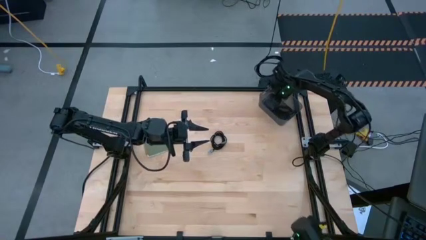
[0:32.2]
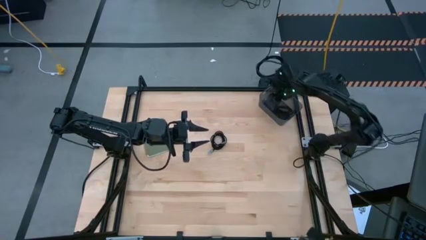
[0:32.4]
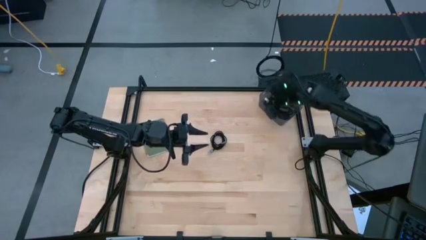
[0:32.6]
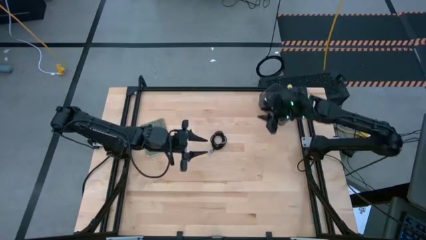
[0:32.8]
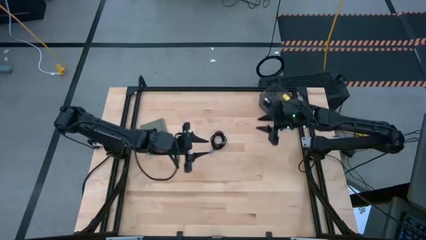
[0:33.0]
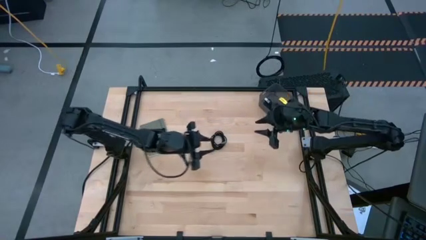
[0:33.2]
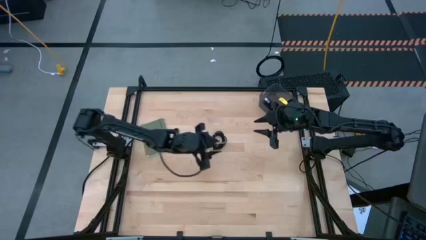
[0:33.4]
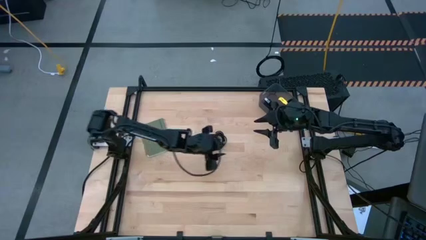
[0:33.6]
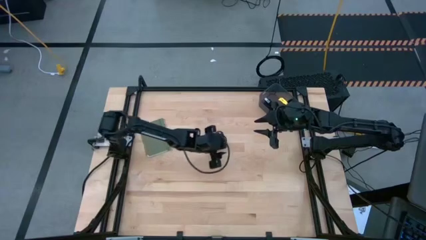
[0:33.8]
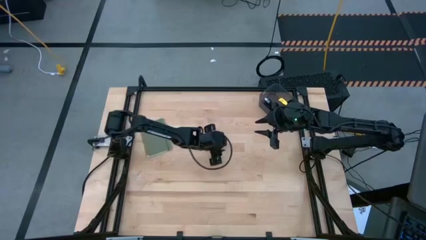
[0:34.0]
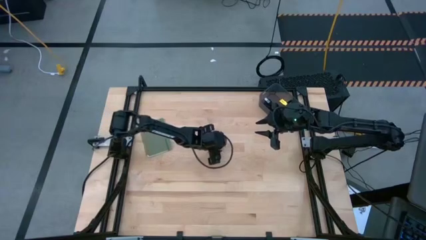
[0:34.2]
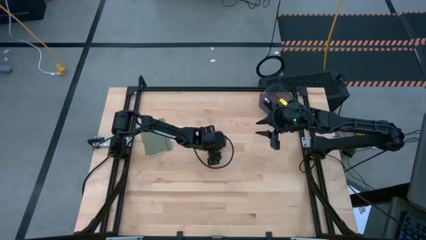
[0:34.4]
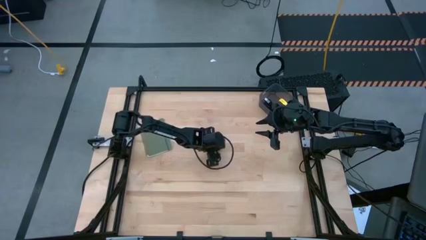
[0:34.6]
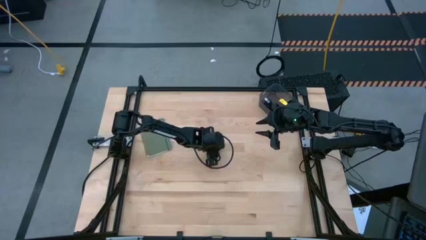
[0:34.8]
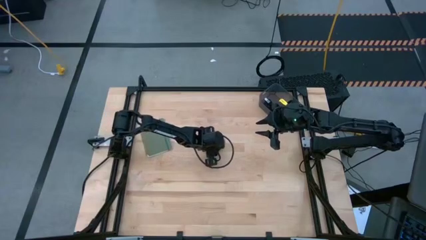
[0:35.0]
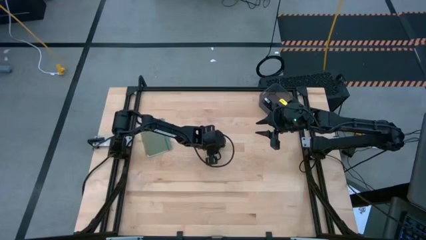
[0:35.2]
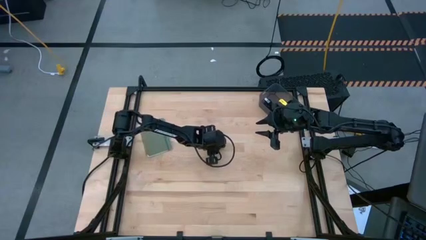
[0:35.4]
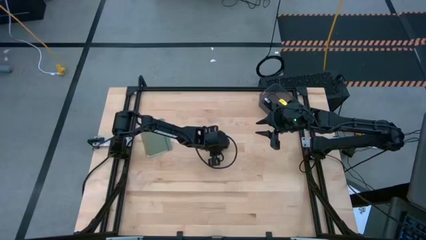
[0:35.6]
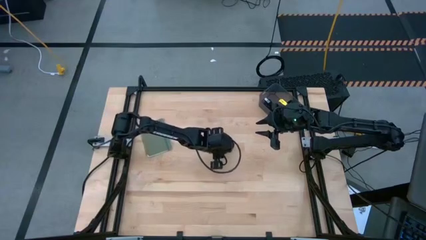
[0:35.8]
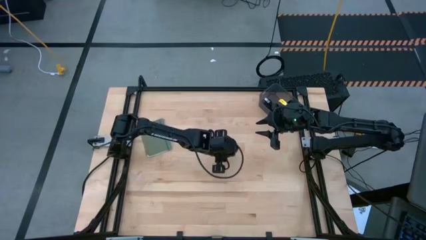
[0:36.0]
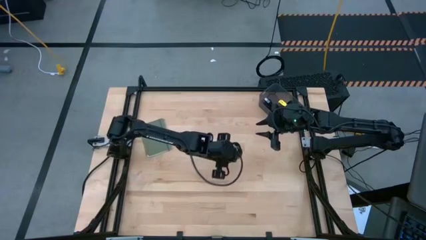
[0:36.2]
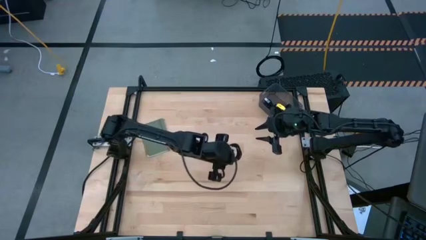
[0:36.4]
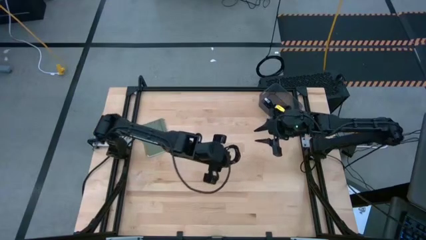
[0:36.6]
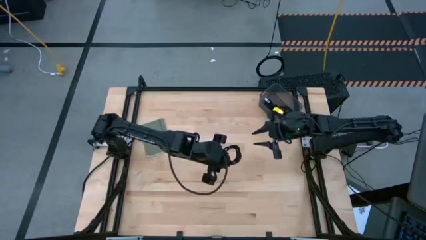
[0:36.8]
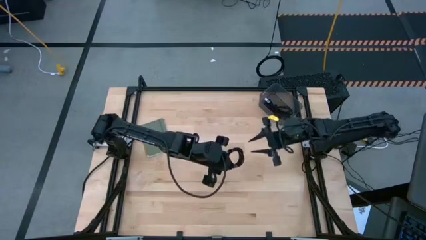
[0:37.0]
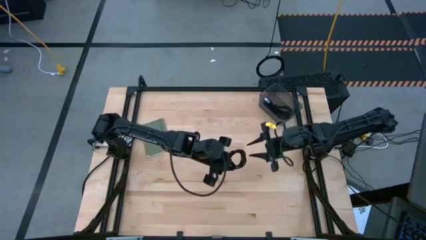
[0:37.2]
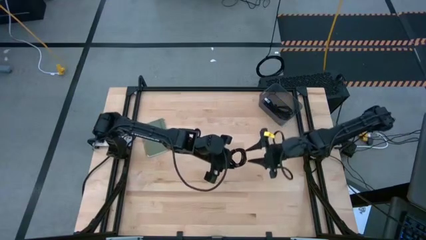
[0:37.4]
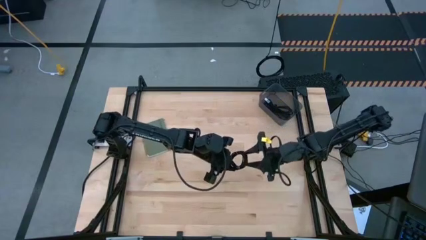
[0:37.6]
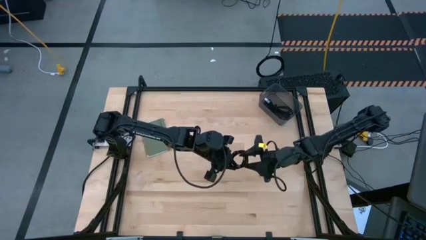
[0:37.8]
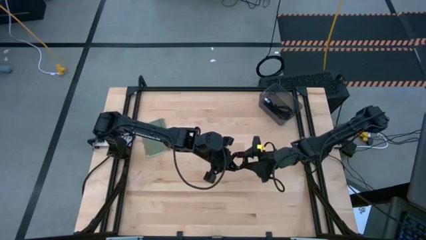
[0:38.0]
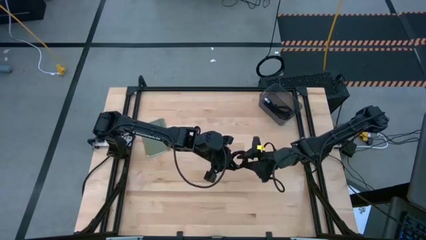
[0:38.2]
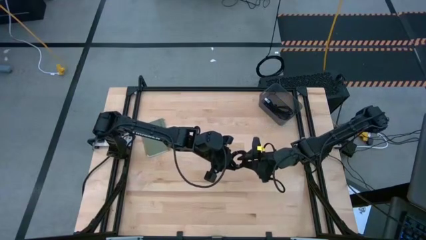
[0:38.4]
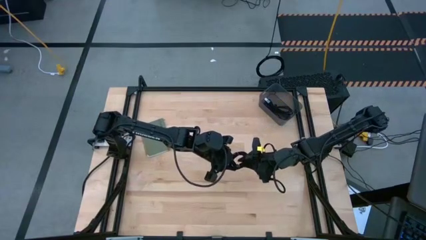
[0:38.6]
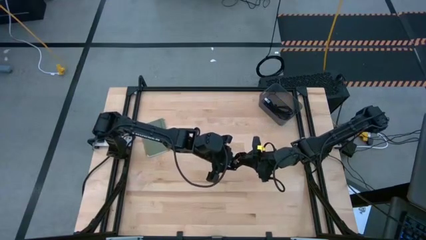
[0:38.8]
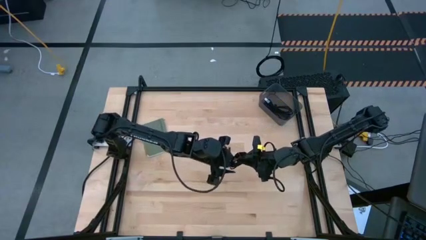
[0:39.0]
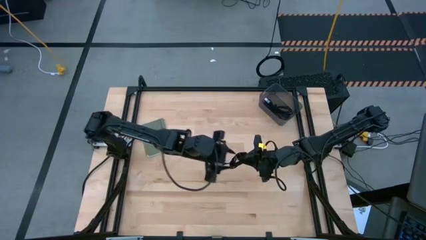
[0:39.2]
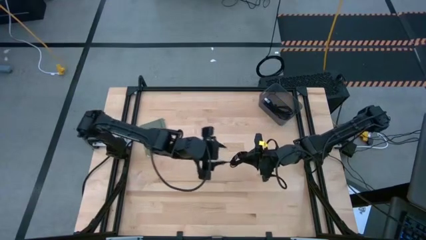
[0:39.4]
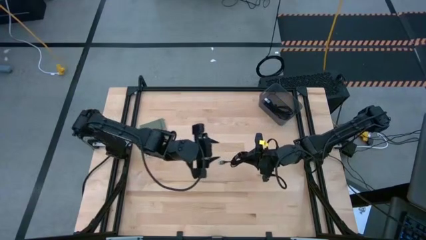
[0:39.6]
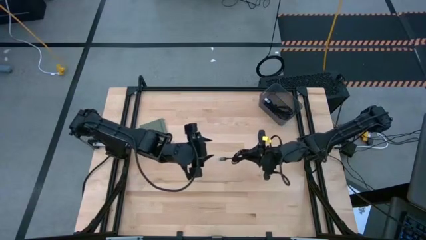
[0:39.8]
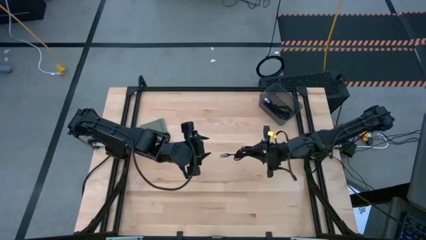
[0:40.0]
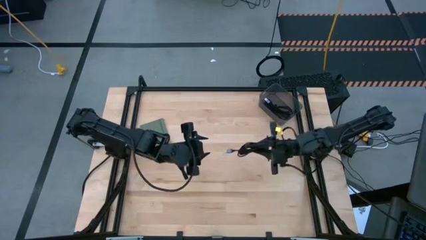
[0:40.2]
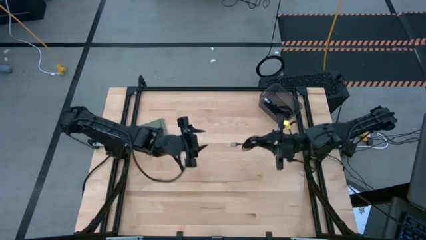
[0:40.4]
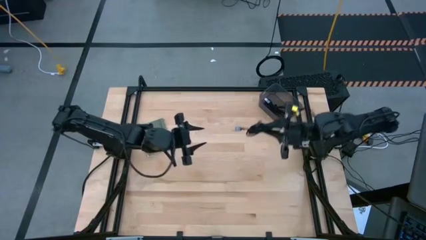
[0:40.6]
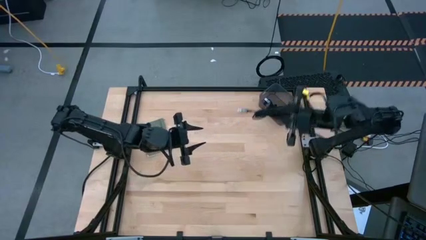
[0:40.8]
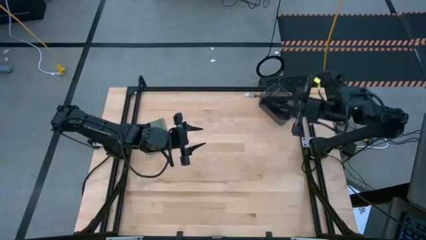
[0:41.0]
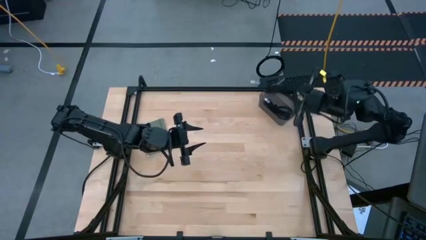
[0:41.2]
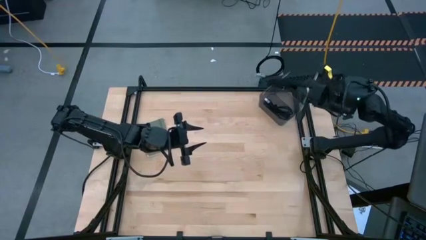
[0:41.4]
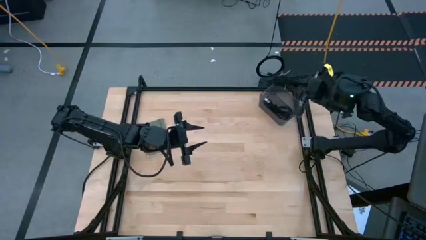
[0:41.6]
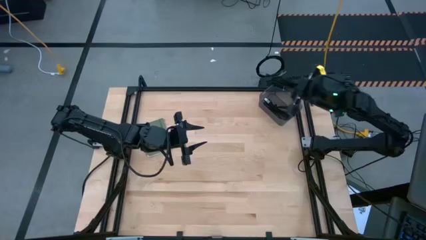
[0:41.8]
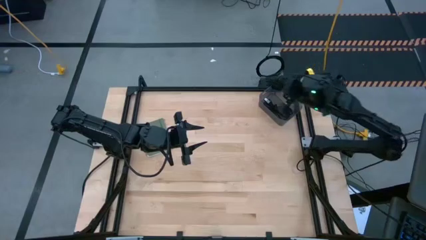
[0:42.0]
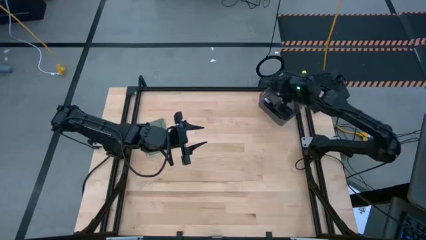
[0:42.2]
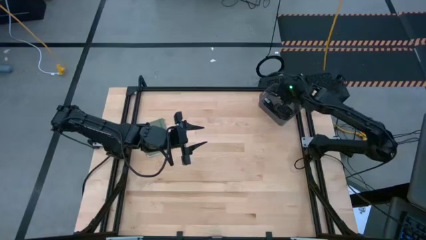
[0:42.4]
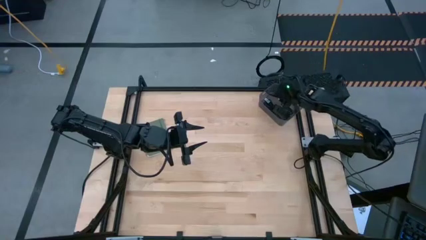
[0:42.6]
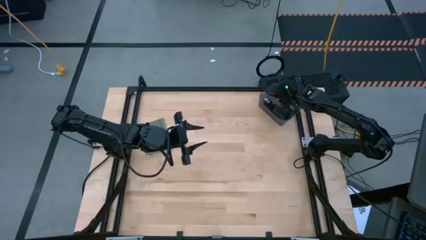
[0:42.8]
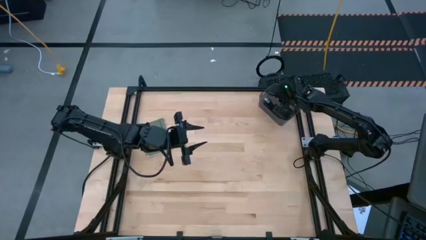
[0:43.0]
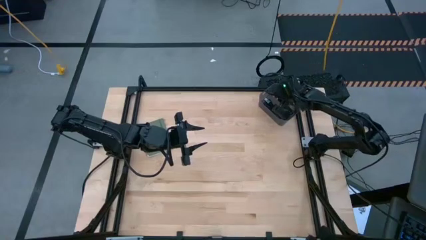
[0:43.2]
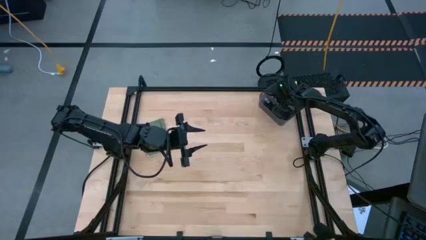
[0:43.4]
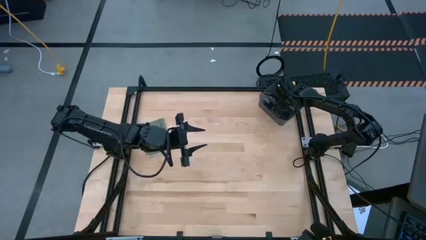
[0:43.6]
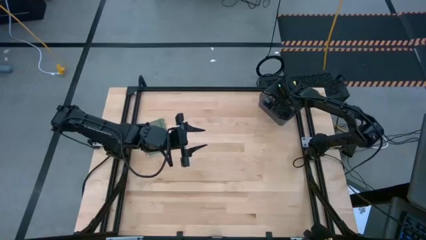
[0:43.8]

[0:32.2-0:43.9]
Task: Pick and place USB-C Cables
Put the black charger cable into the black bin
